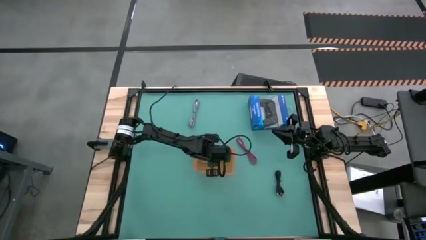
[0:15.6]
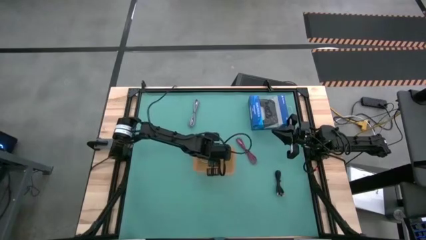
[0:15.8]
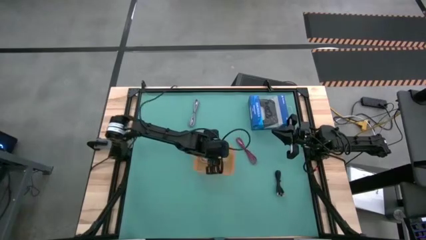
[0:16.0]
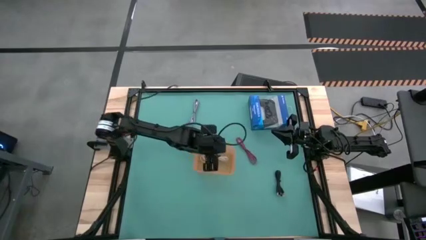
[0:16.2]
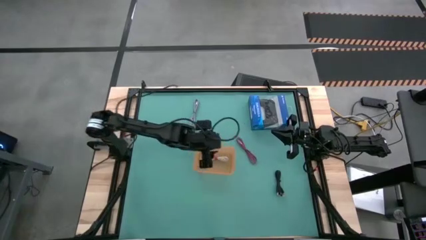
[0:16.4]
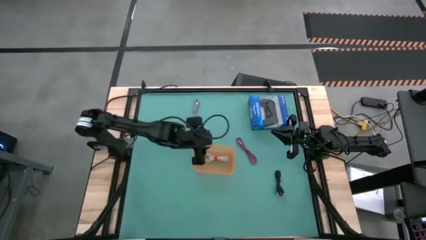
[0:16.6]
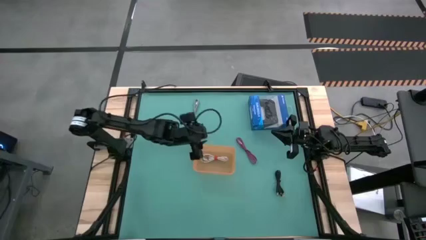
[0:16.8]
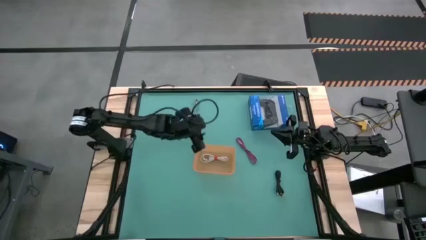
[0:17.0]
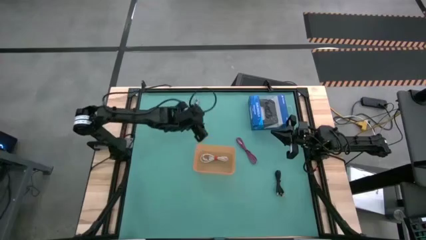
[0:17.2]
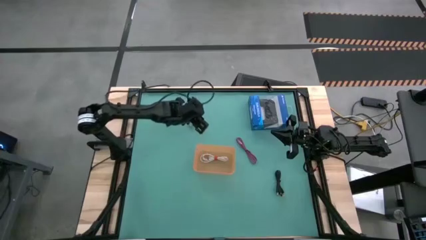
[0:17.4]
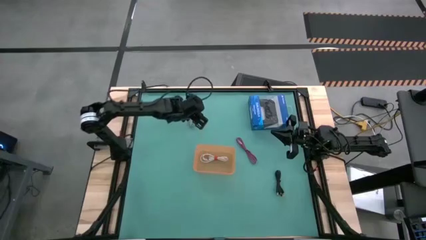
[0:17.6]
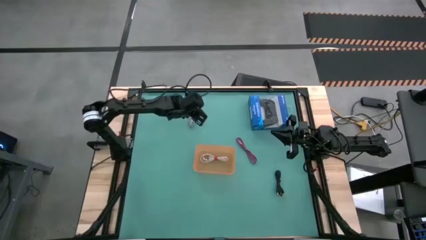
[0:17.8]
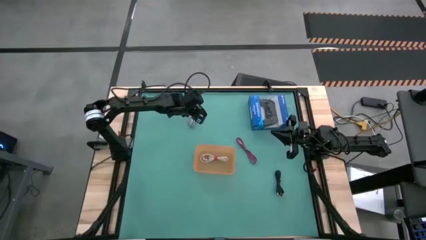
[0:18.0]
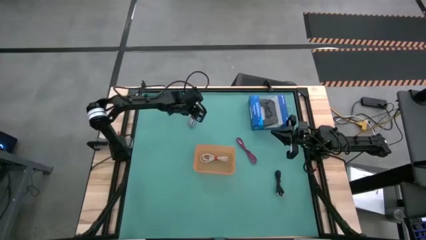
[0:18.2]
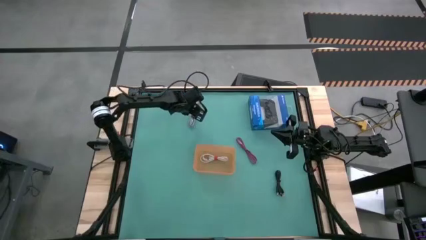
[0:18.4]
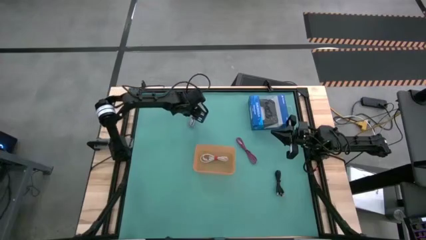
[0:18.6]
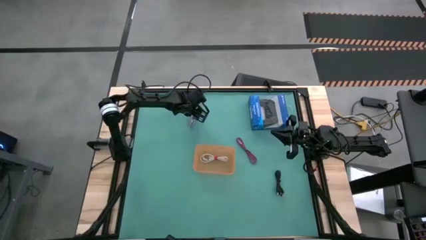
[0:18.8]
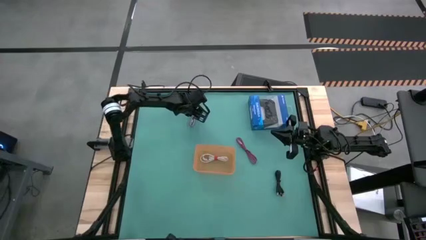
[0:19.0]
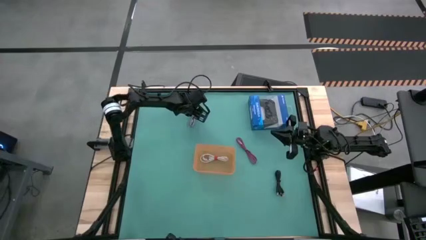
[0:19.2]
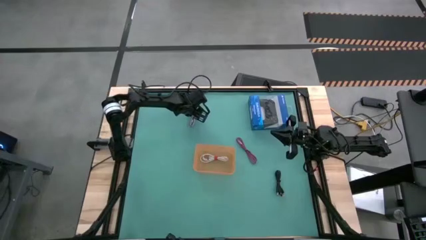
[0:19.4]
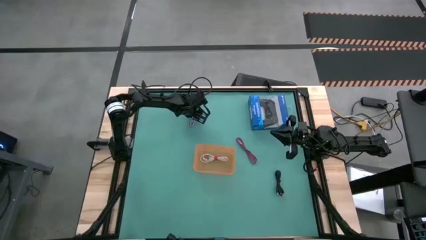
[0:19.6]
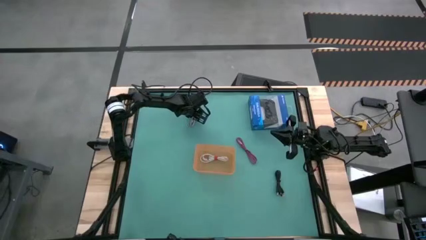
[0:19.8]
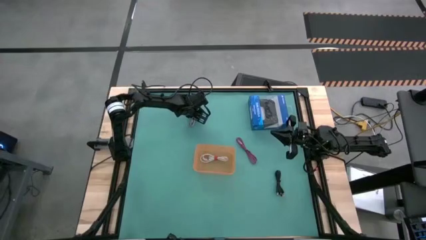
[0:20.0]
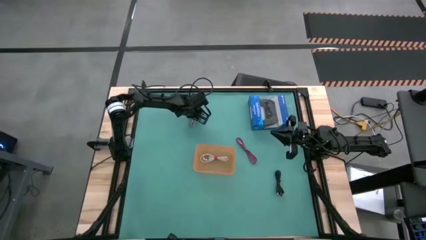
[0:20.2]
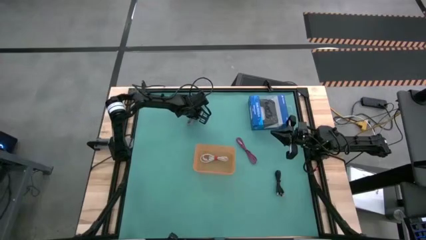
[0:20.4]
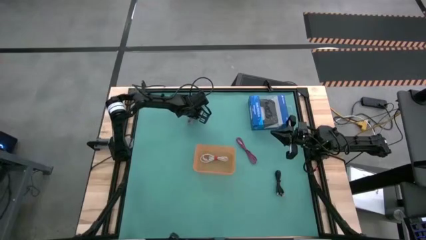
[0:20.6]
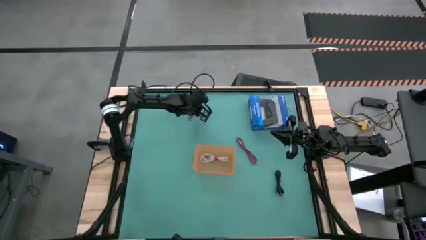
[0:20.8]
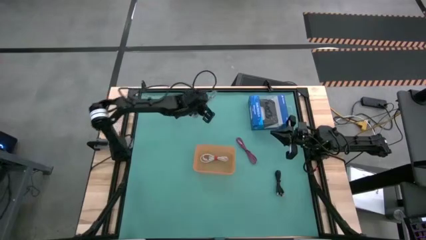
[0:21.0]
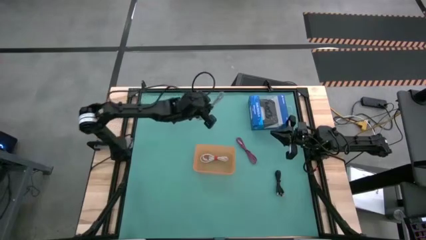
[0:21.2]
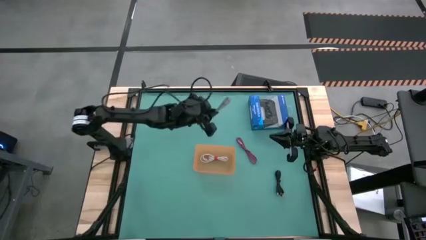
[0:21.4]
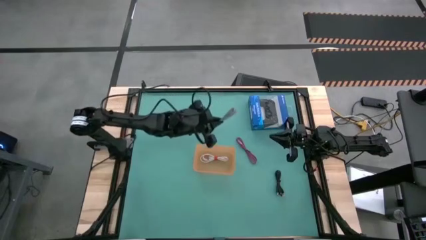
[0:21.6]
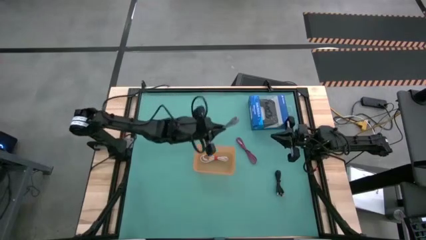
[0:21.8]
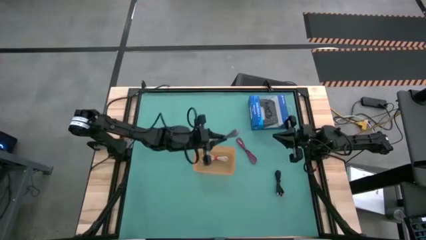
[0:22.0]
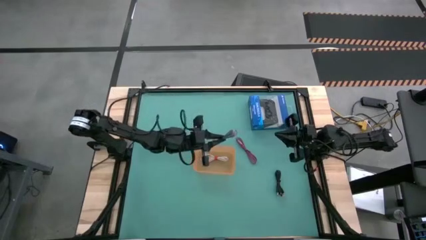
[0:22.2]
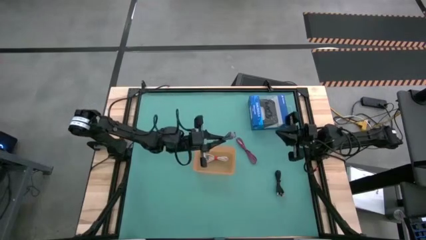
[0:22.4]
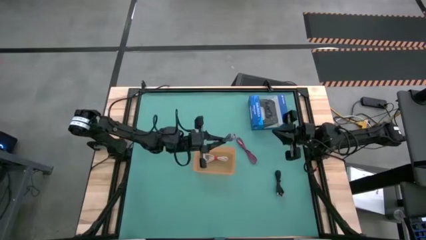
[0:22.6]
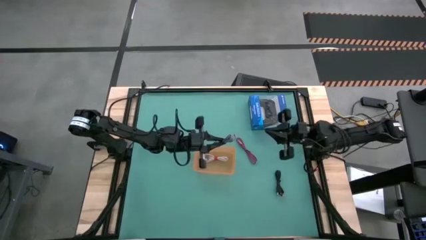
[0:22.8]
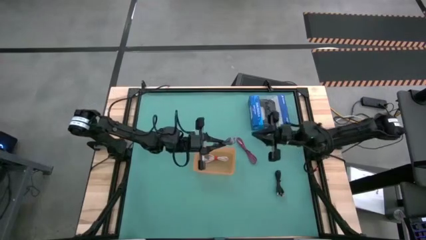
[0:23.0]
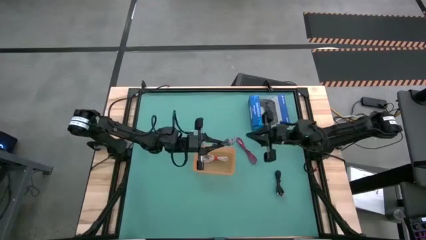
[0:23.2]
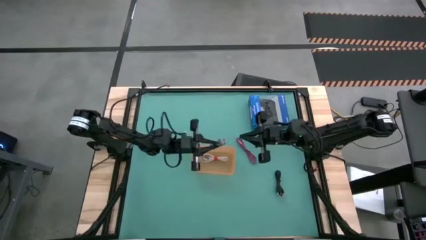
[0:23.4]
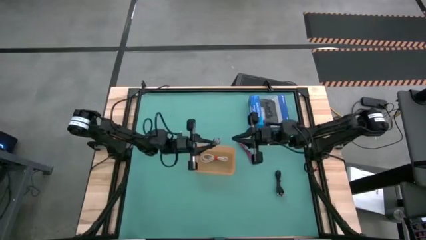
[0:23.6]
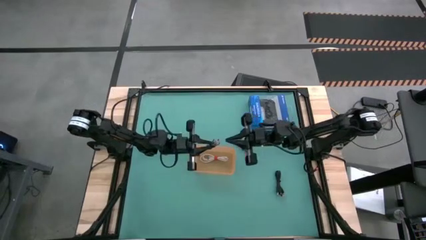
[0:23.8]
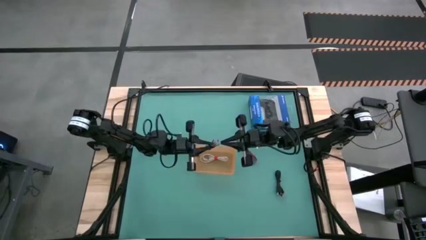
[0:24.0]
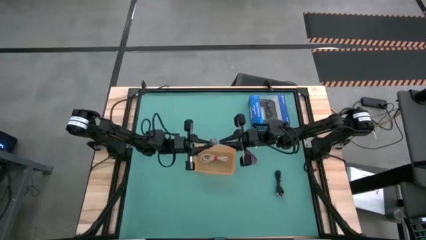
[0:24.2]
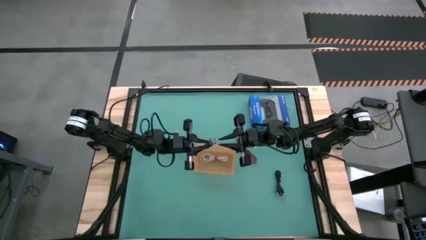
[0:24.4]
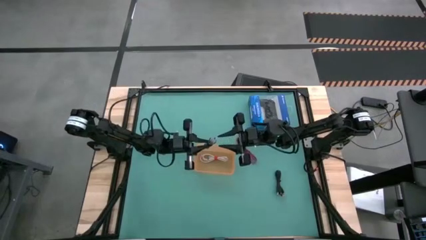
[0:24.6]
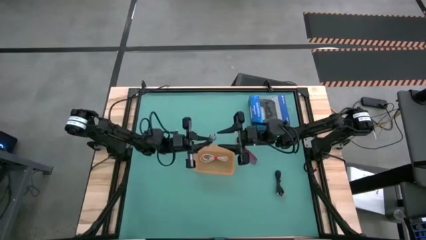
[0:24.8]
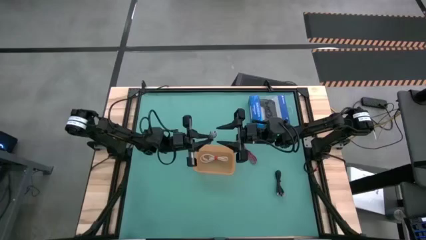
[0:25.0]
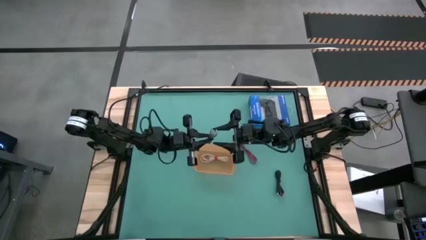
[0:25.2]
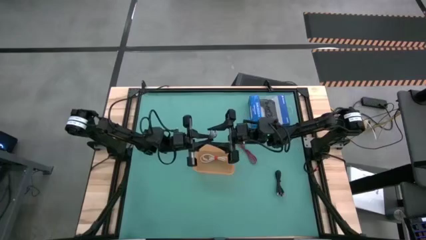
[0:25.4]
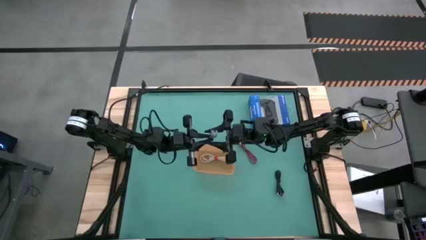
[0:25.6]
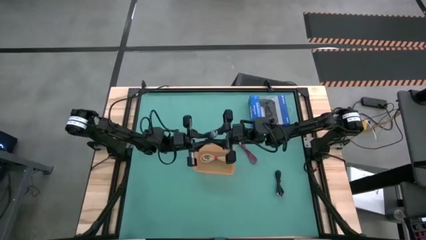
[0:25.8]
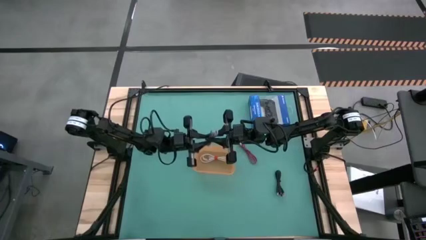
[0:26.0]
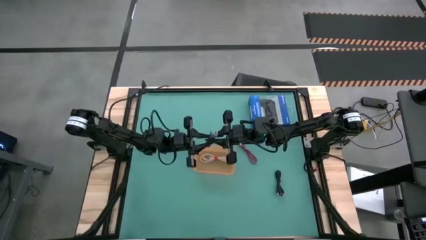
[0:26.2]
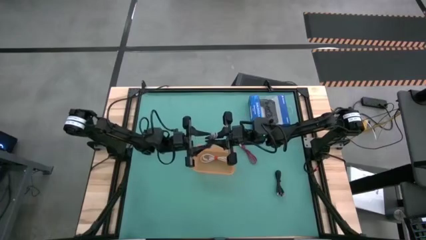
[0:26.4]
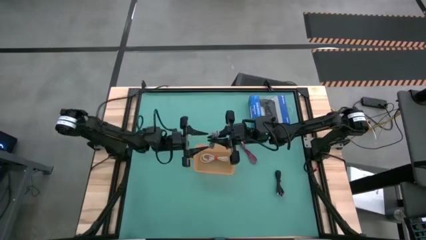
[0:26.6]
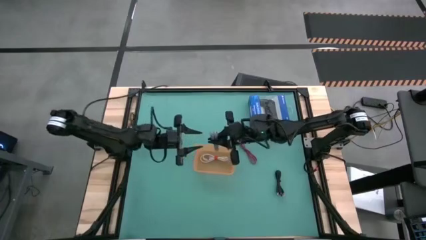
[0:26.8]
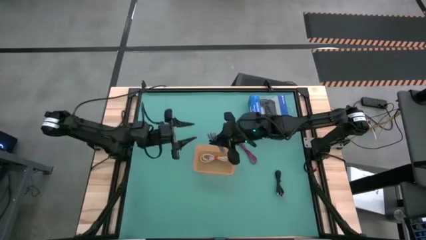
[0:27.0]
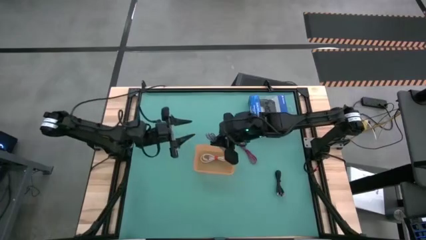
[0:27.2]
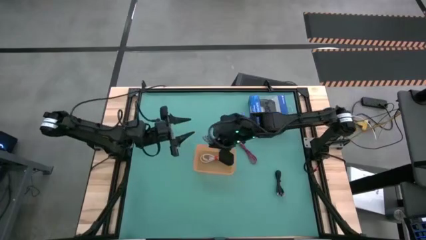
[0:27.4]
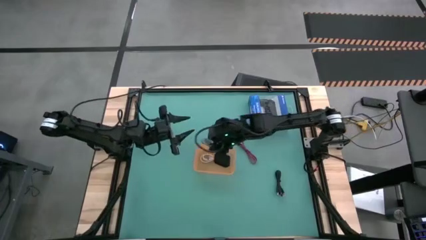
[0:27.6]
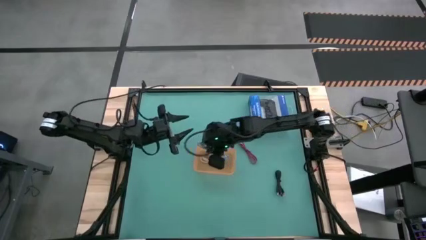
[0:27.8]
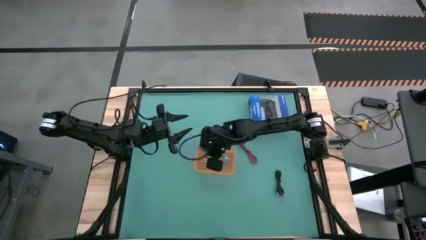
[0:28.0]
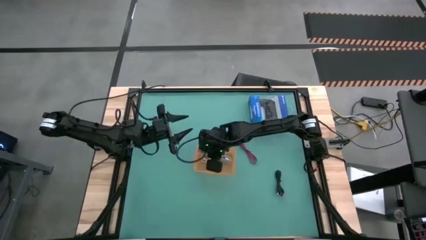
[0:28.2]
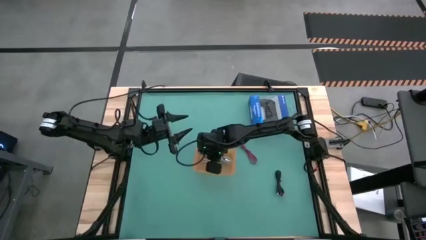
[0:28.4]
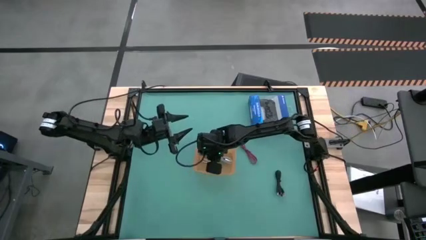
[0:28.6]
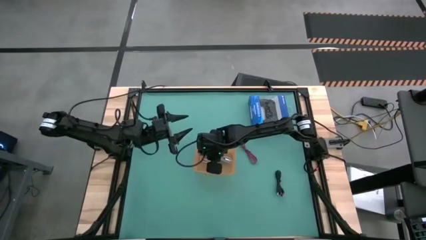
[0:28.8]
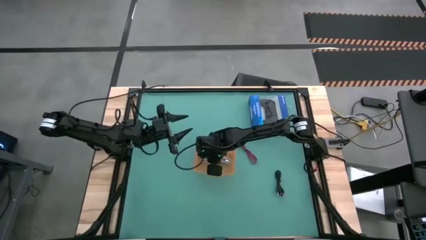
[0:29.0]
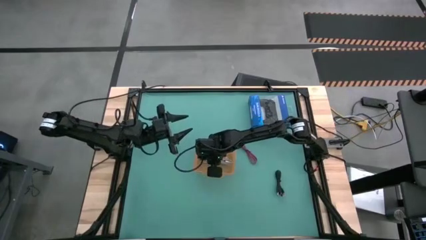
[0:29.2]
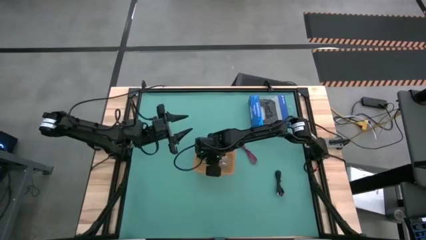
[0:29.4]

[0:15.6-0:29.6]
Task: Pick and place USB-C Cables
Put the black white charger cable into the orange bin
